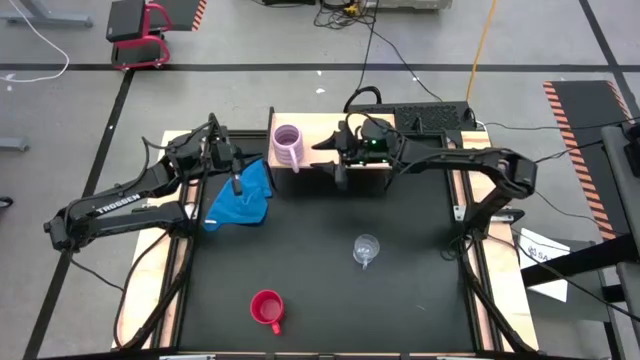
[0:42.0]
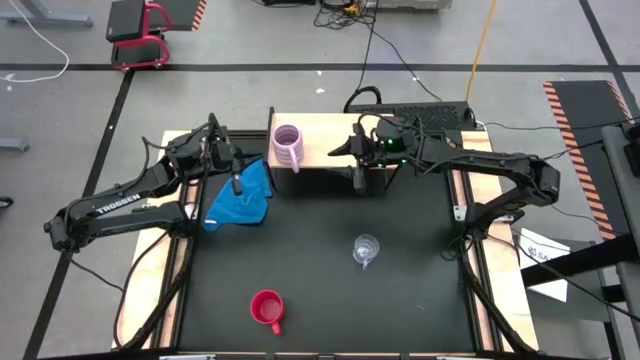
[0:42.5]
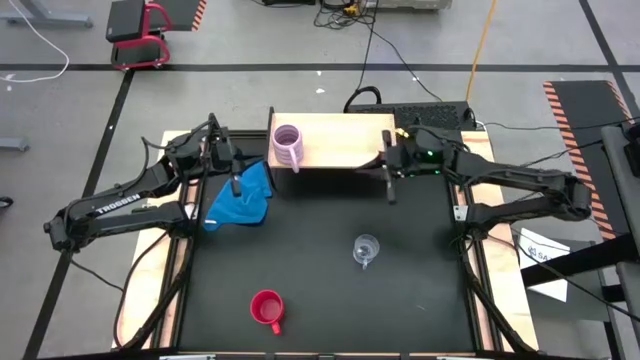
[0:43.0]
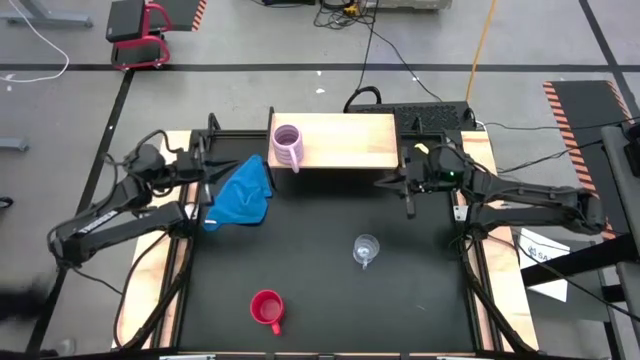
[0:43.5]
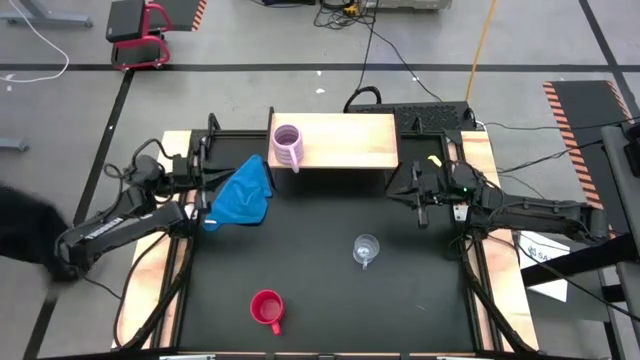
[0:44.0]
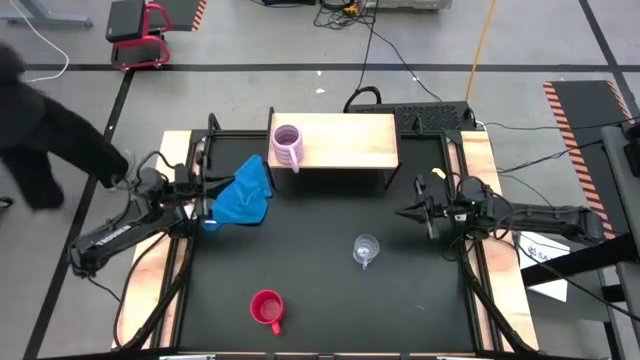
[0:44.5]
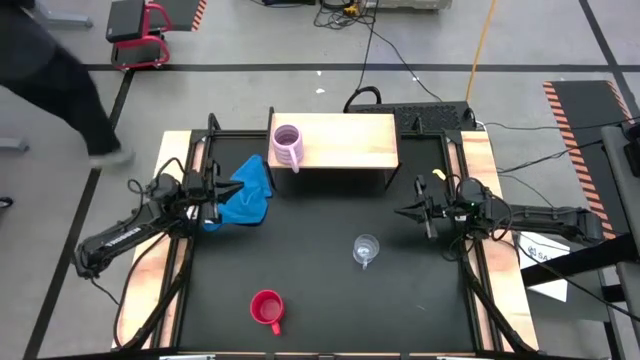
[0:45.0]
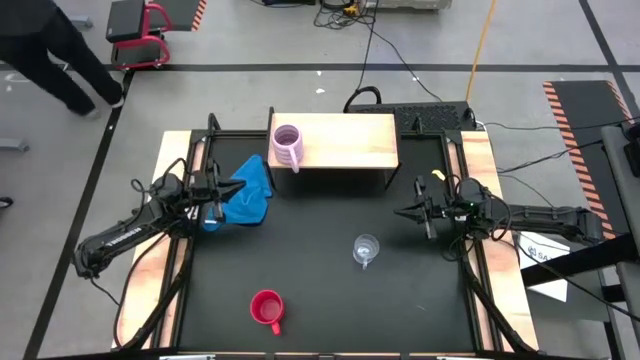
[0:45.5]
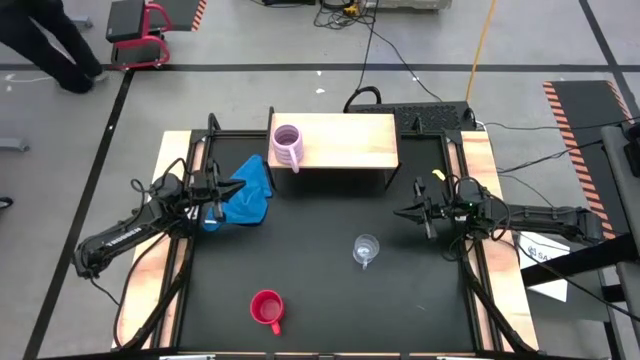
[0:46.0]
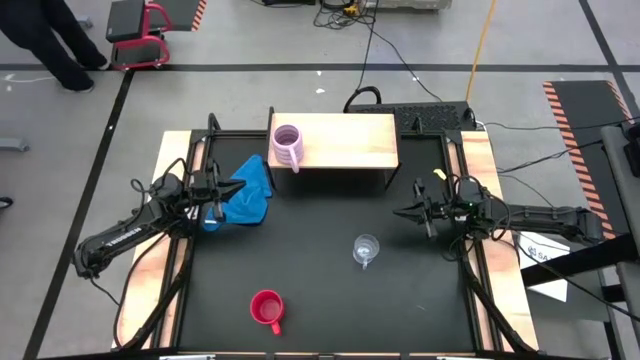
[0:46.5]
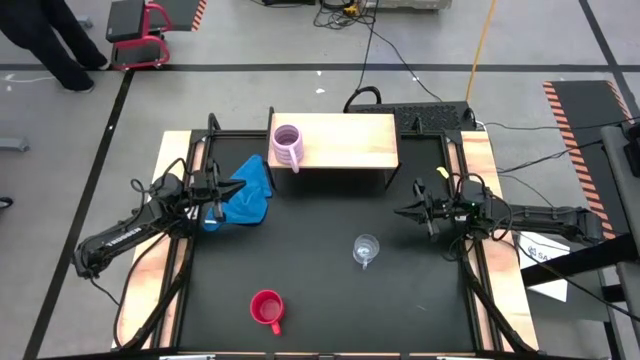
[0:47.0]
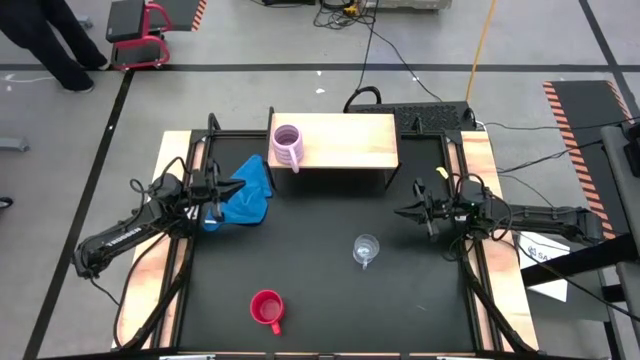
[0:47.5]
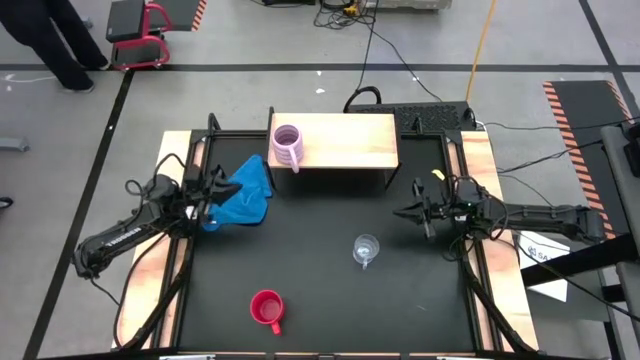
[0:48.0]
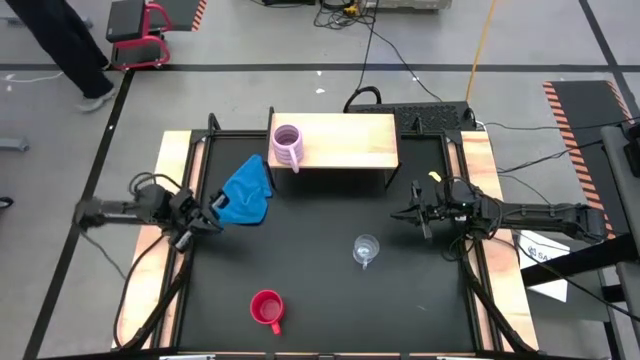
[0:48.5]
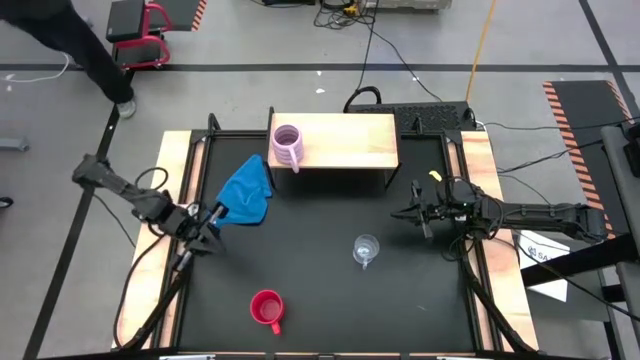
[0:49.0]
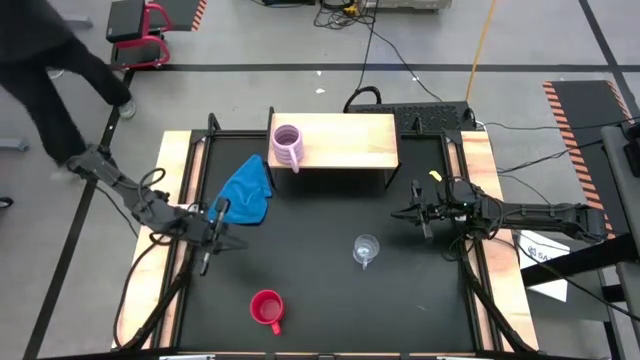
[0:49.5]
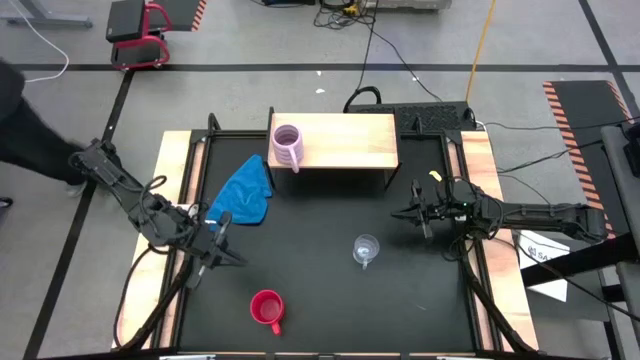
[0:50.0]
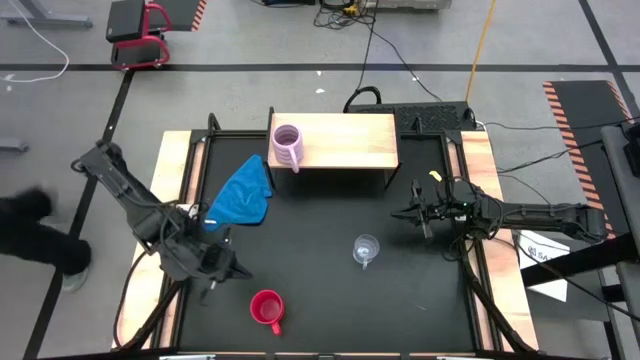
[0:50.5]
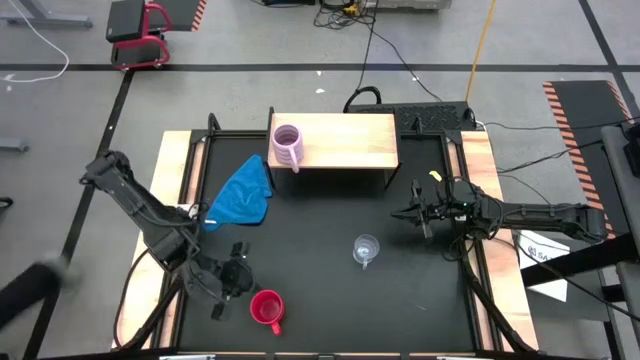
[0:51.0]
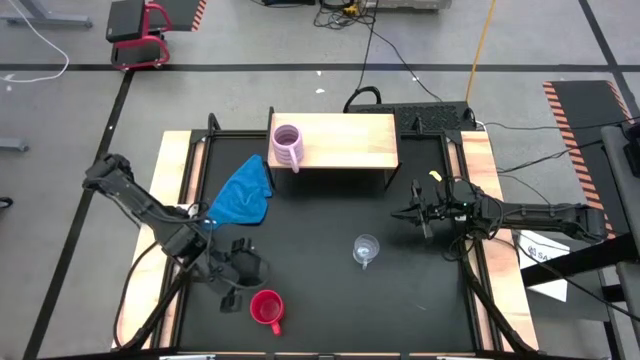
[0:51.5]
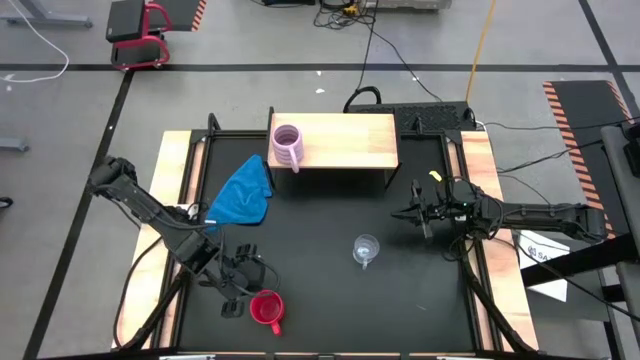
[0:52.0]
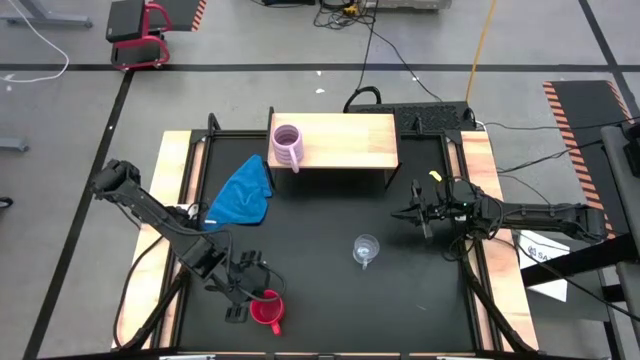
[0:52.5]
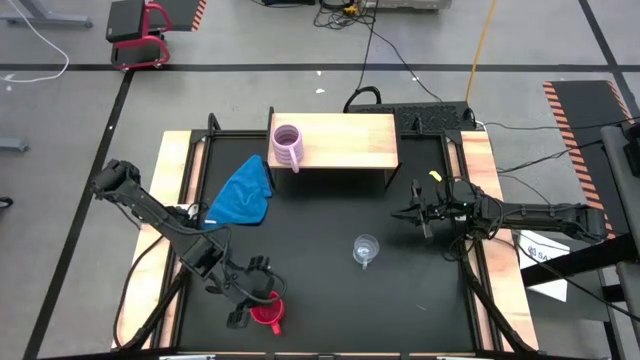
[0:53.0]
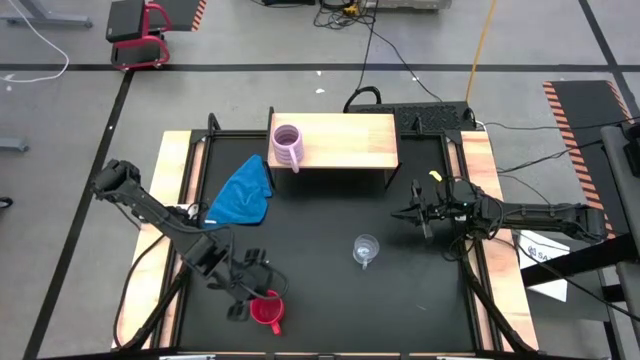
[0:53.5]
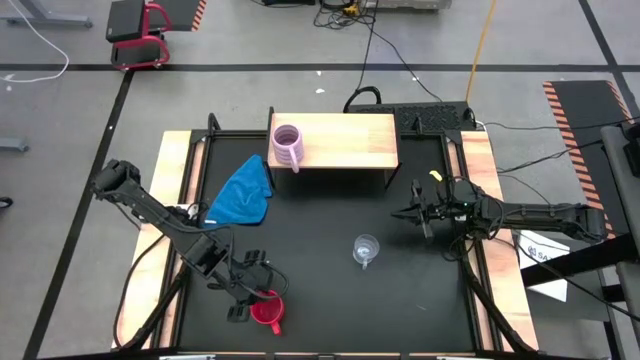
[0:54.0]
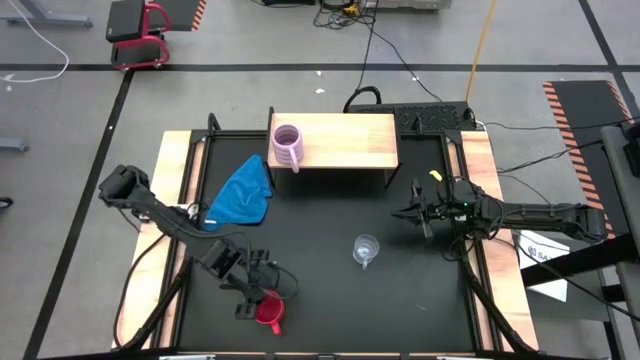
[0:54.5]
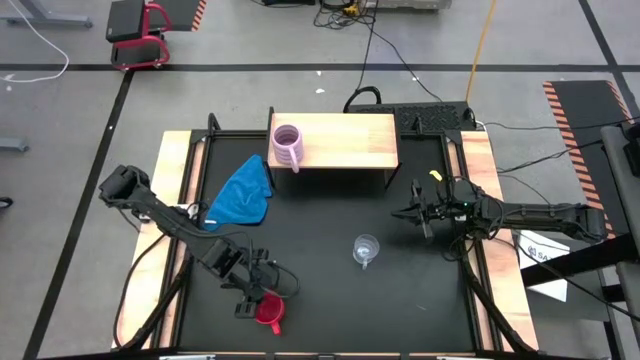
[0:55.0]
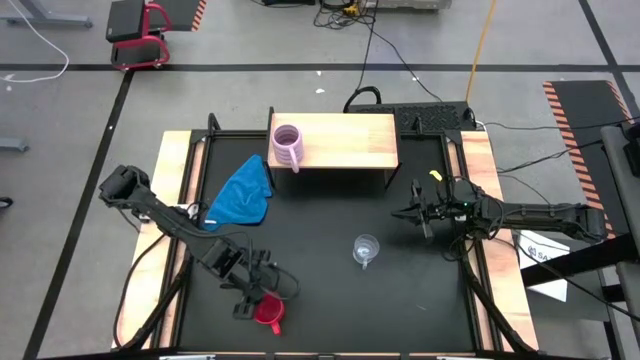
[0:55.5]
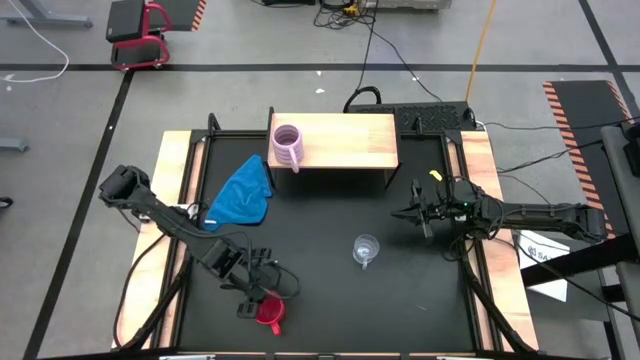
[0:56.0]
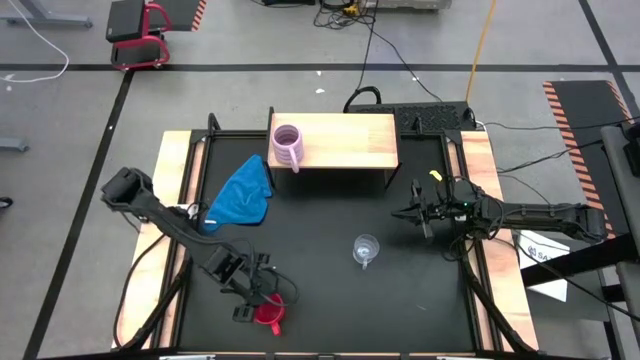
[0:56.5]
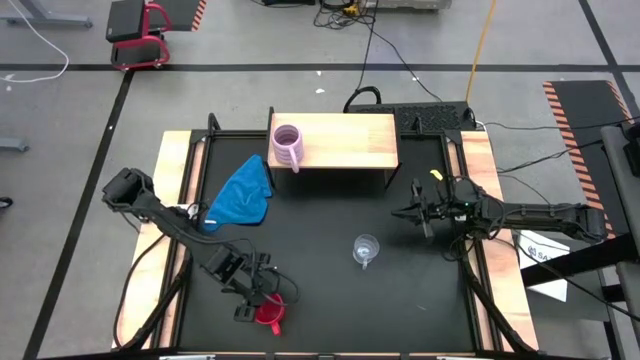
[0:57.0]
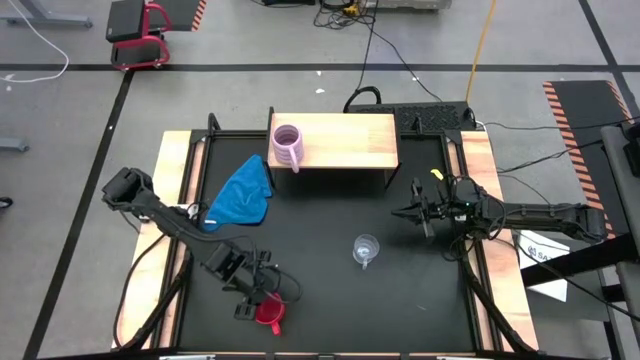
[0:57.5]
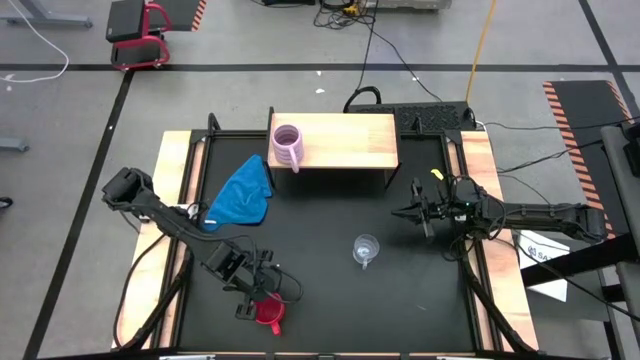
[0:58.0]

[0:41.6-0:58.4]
Task: Stack small to large cups/mugs on shelf
Put the red mug on the shelf

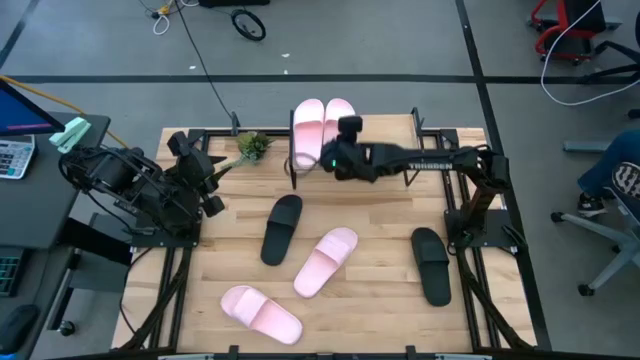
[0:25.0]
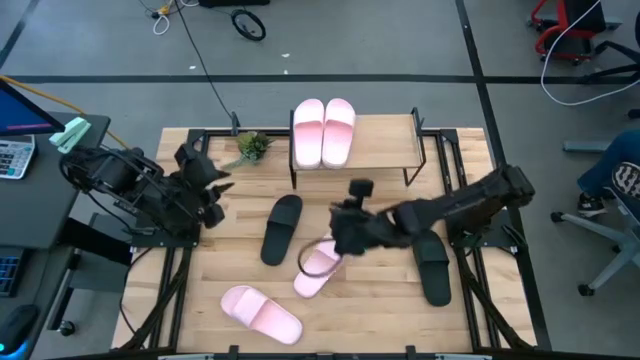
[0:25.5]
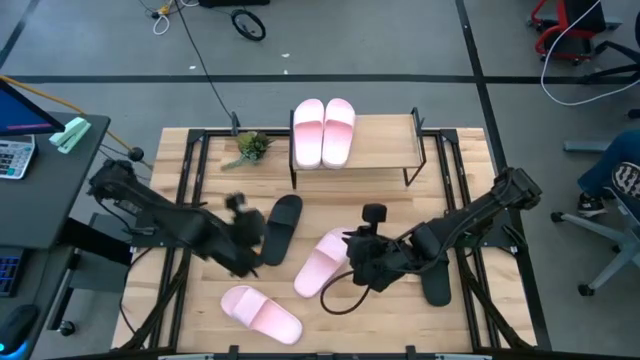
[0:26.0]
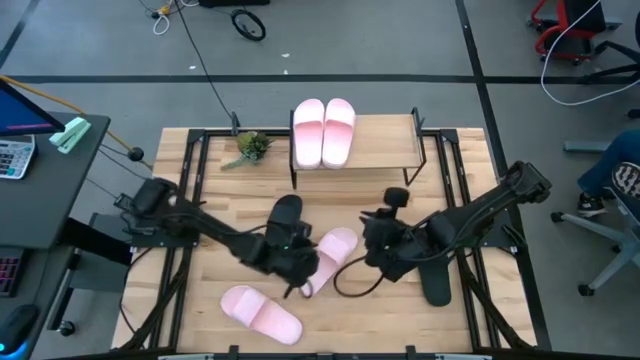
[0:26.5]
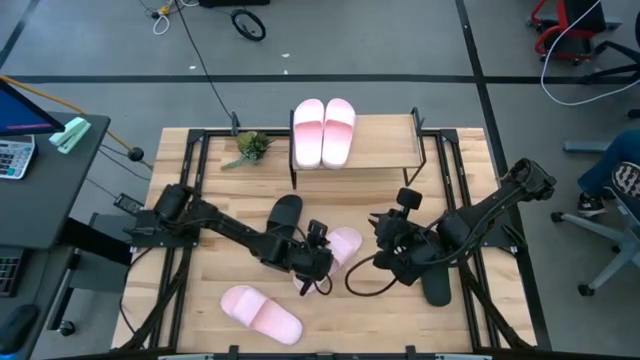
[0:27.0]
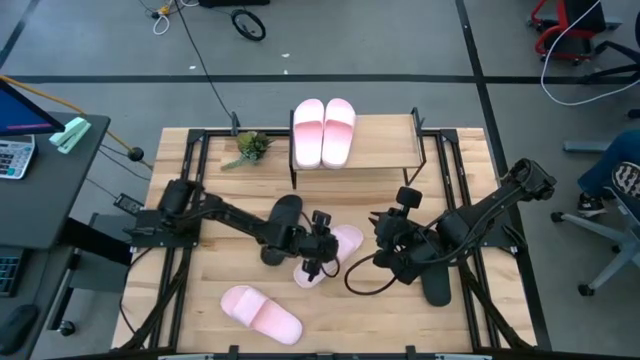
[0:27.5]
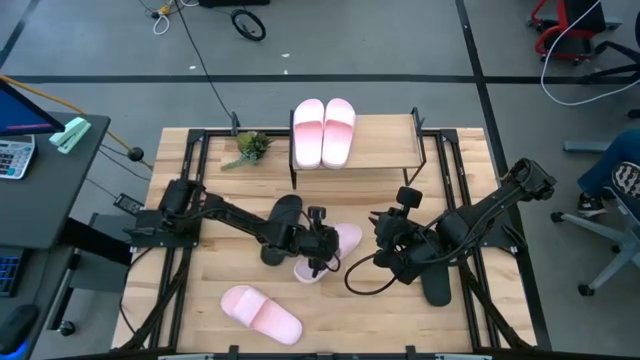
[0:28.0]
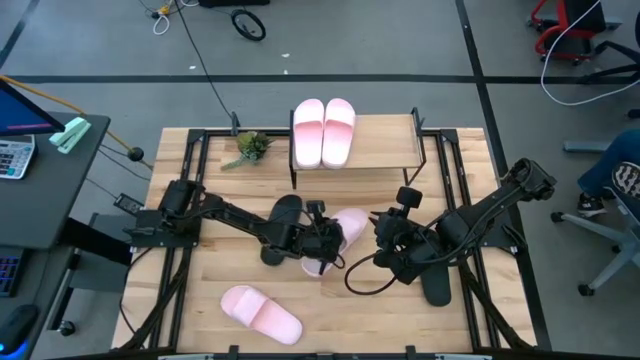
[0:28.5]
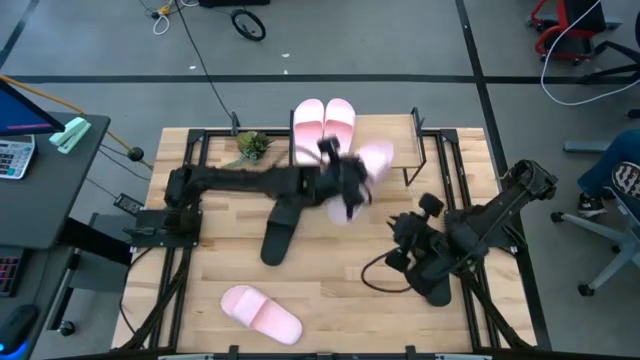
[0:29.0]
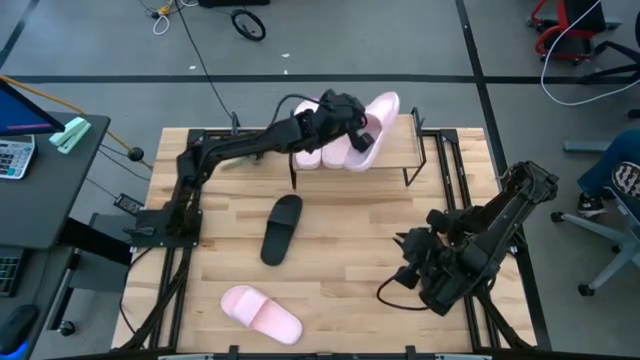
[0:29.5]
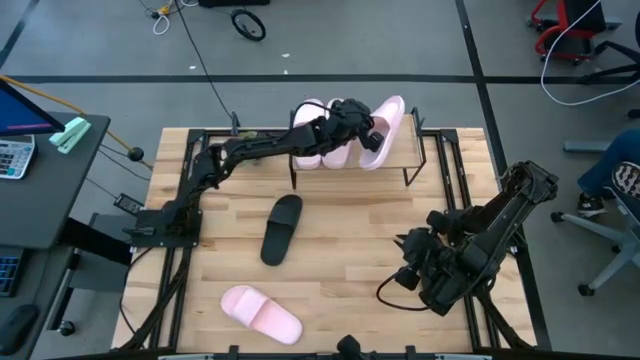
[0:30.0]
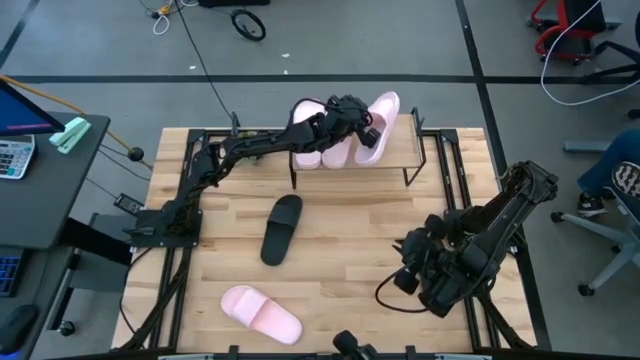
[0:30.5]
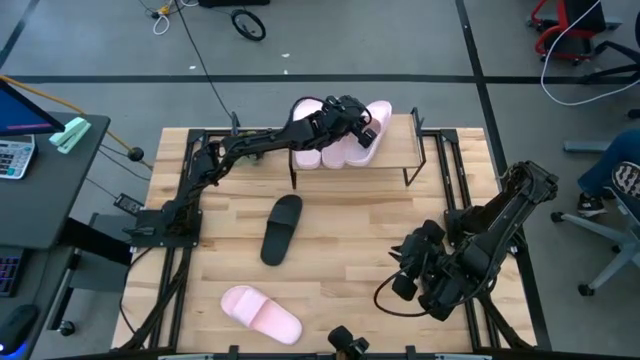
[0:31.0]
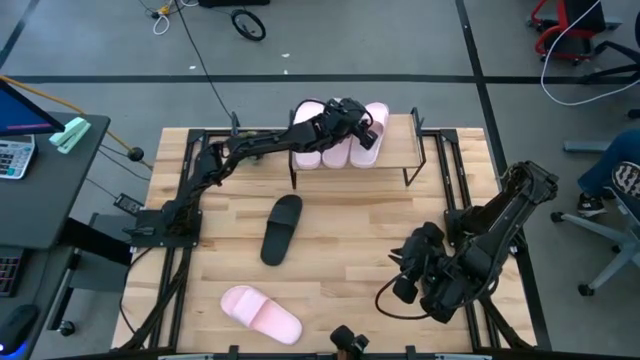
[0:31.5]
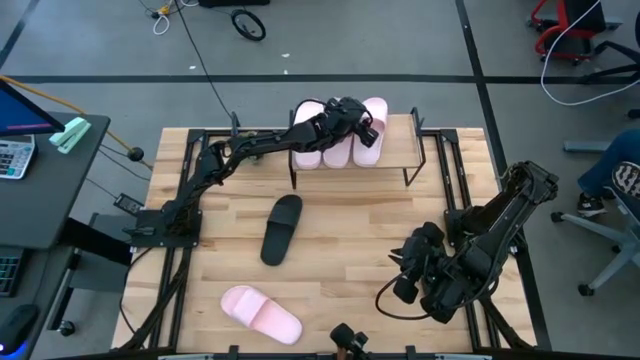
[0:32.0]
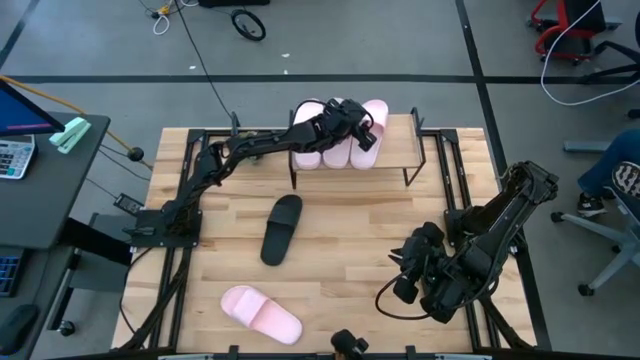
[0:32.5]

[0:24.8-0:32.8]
Task: Pick and place slides into the shelf
Put the top pink slide on the shelf
